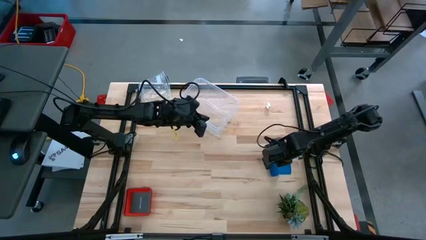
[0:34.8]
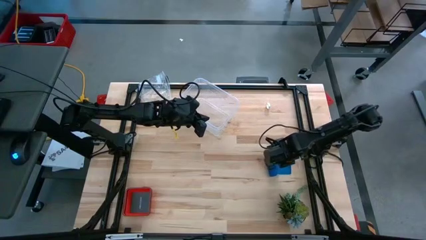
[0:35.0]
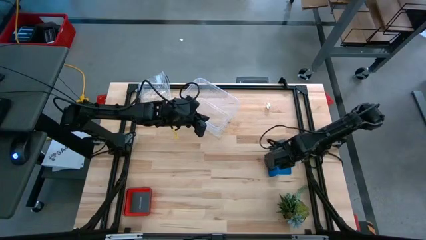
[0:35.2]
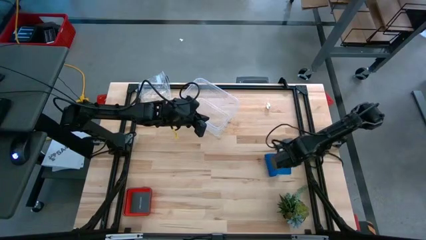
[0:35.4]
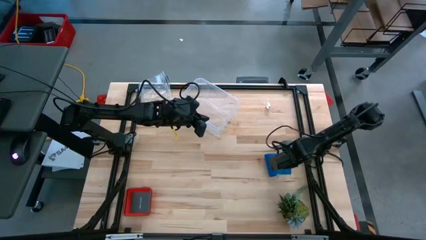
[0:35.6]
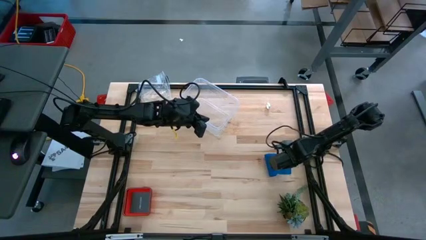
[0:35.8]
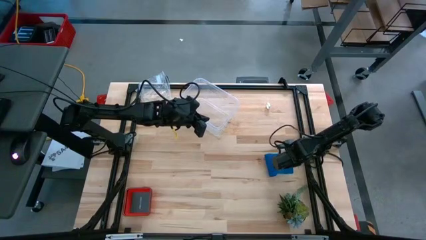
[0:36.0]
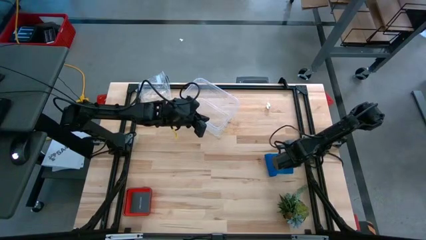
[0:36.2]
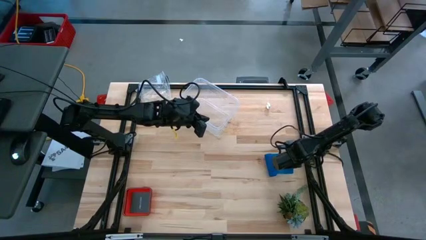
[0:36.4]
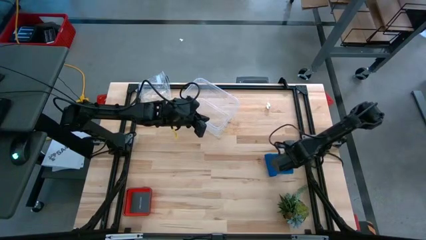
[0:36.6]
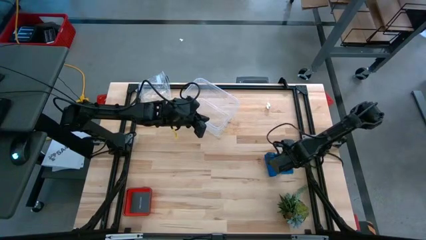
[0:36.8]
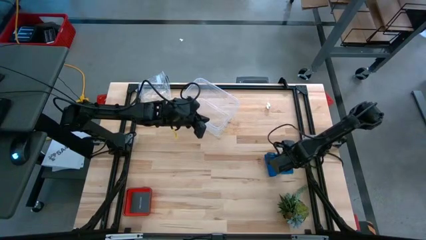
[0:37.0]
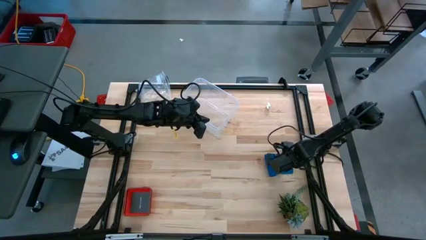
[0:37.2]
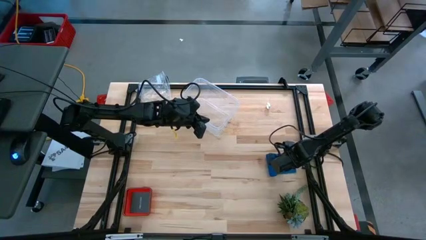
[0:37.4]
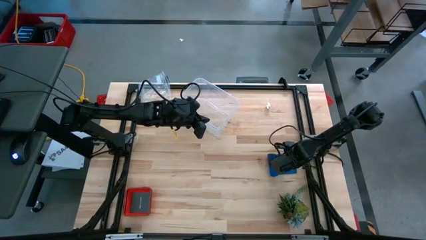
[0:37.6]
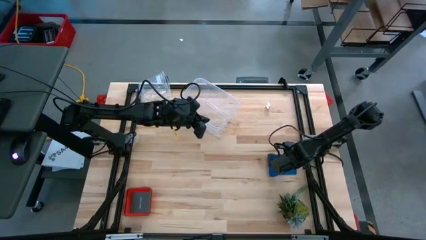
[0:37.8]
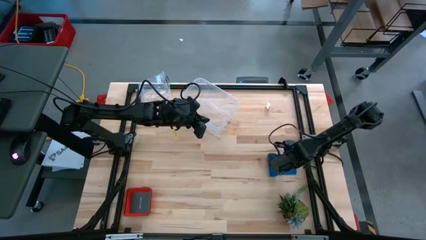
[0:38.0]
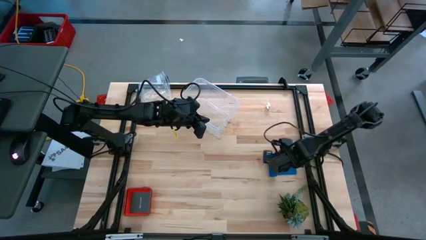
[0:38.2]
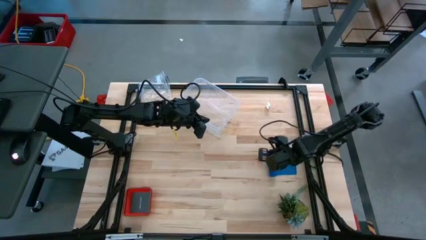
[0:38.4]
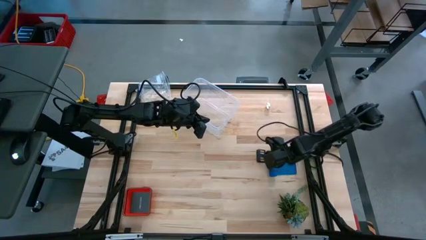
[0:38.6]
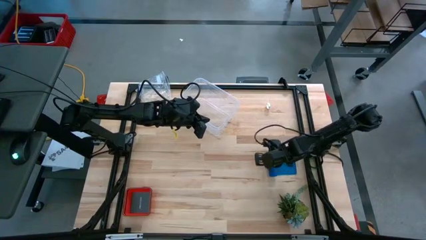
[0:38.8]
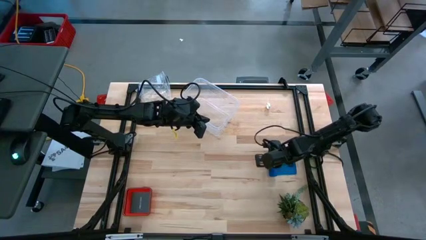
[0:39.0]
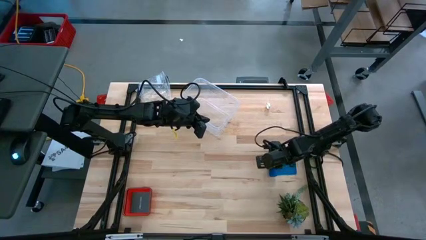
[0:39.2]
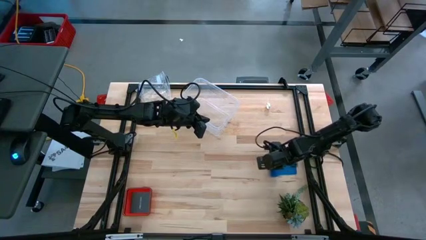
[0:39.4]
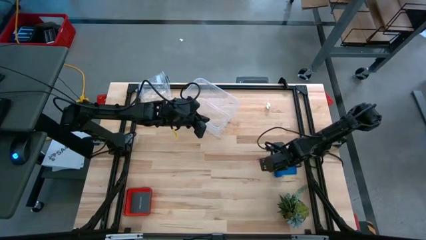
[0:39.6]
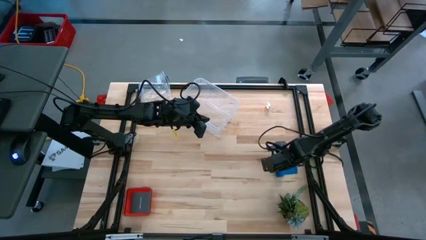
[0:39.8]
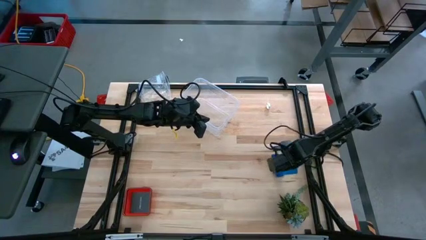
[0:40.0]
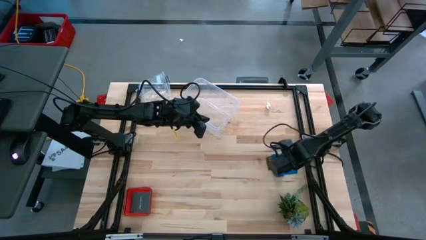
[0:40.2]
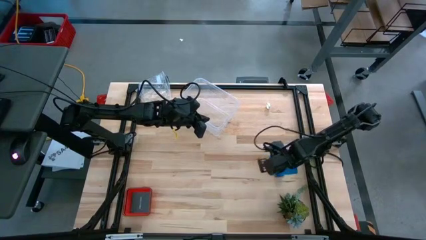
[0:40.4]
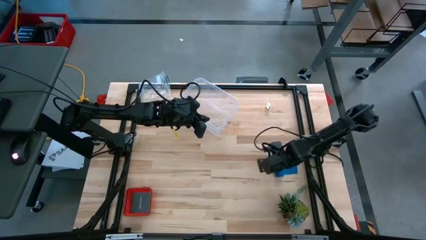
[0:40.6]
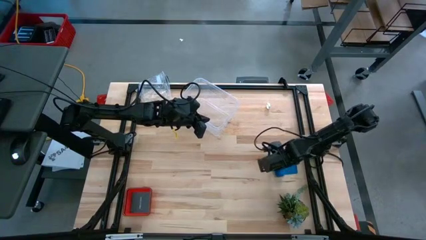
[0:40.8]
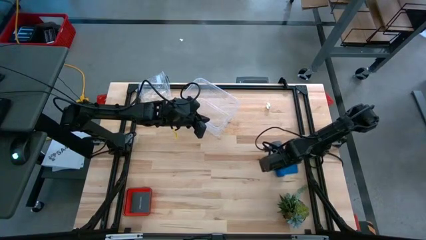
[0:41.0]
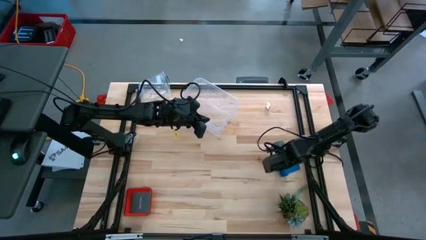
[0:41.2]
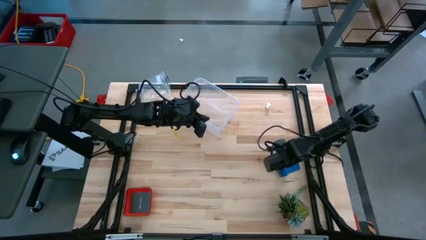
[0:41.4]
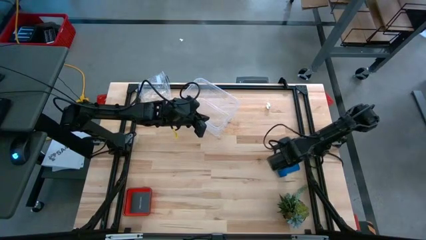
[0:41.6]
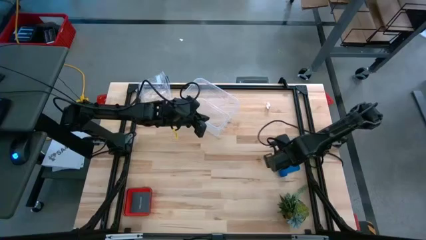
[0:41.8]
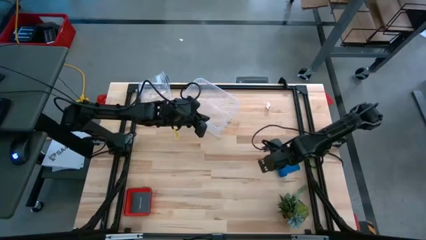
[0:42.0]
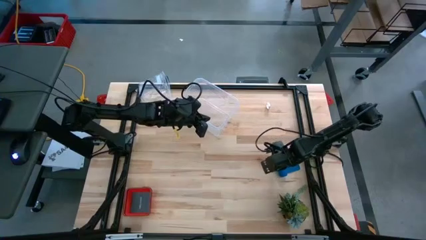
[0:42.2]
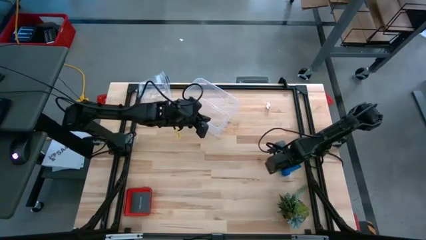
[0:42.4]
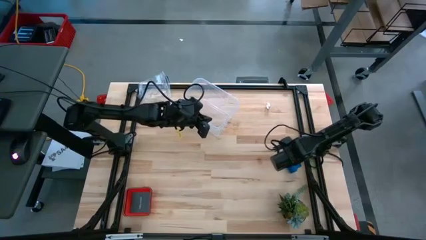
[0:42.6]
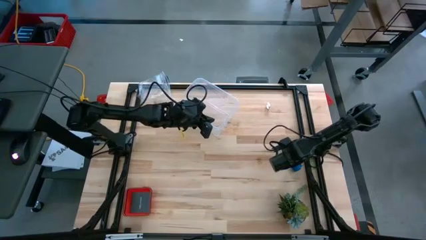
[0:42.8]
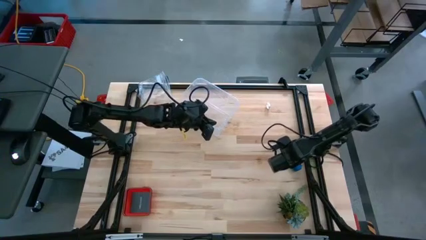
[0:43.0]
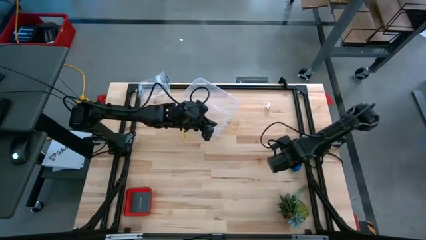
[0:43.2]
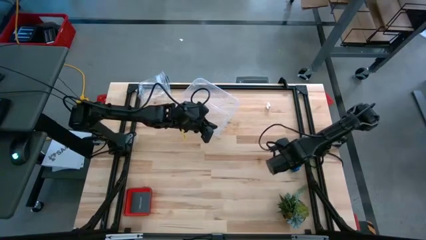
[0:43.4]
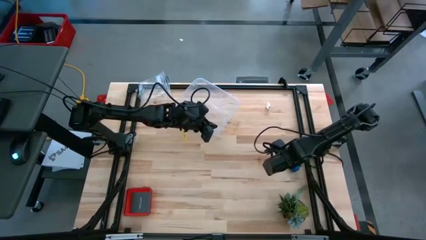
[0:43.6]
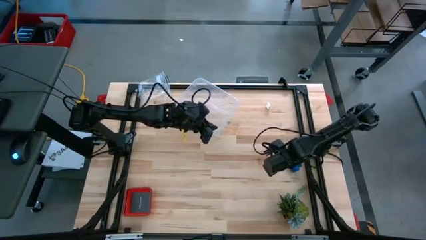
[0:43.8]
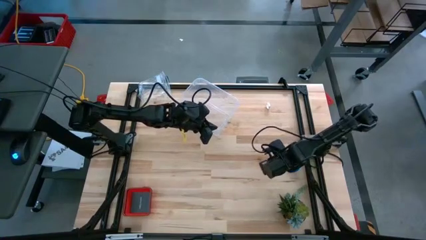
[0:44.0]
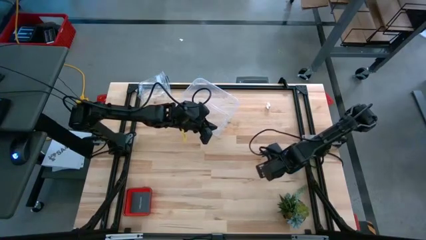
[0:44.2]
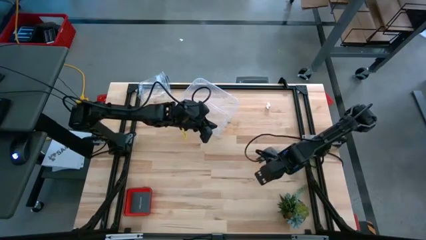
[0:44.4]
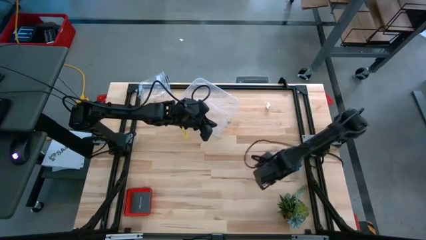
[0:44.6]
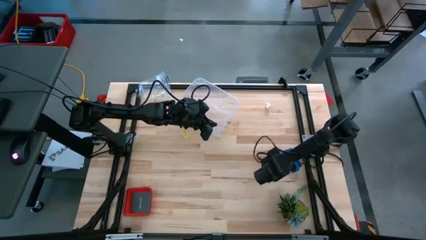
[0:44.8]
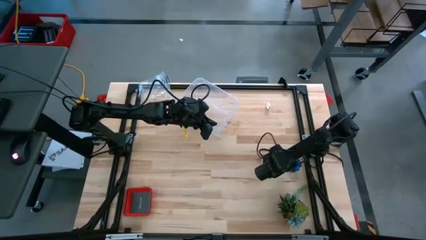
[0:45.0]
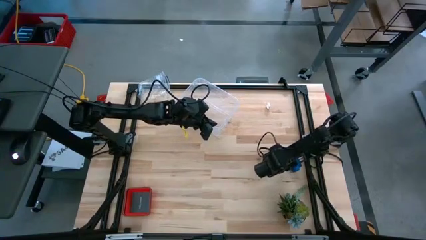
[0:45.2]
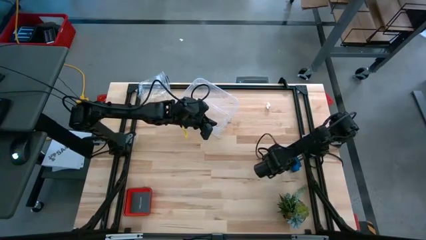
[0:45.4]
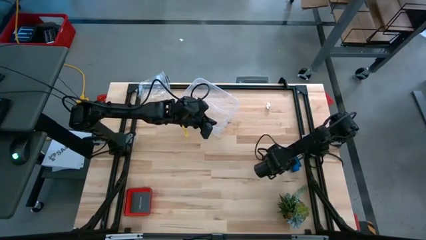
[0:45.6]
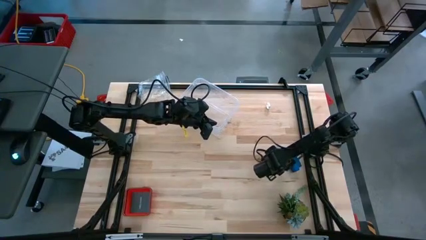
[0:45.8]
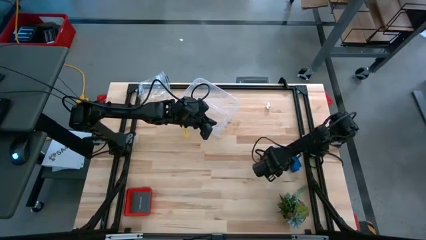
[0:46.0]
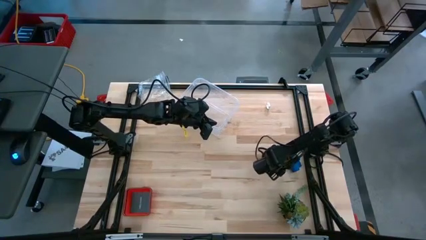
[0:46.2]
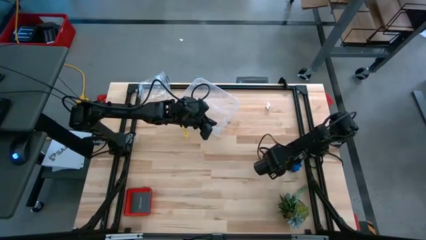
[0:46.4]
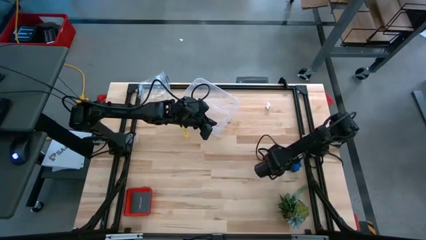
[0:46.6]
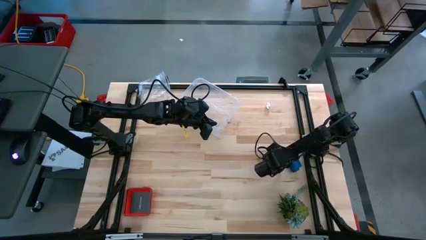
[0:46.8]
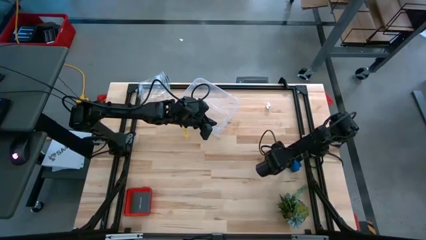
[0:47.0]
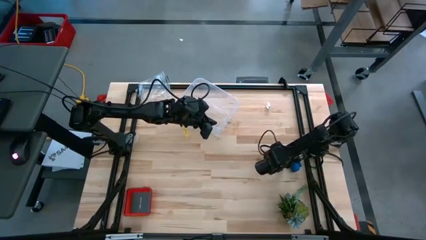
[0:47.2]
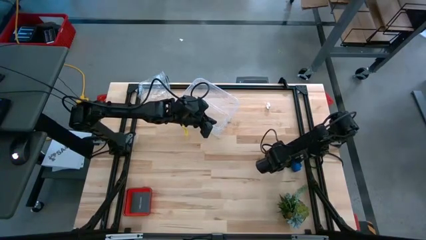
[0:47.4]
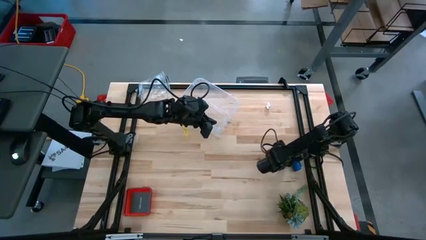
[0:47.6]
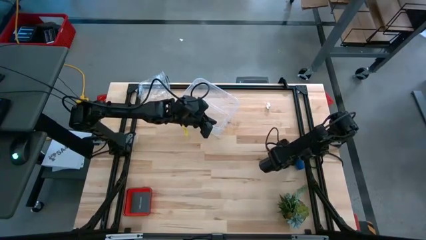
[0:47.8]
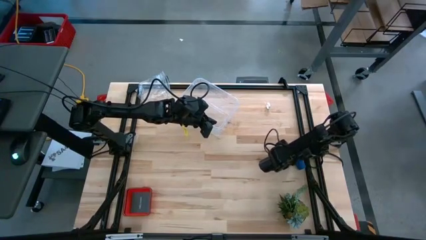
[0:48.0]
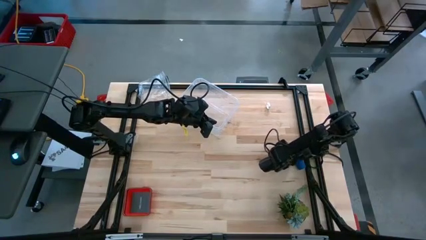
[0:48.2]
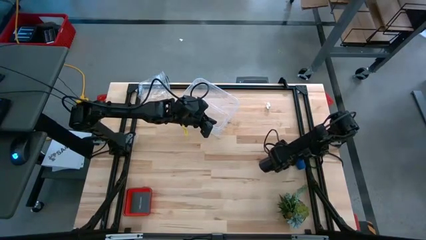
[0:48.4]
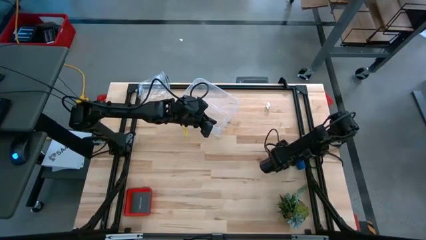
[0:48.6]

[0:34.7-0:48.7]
Task: Roll bandage
Roll the blue bandage

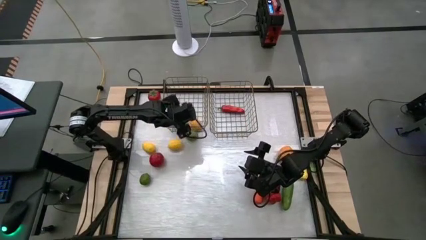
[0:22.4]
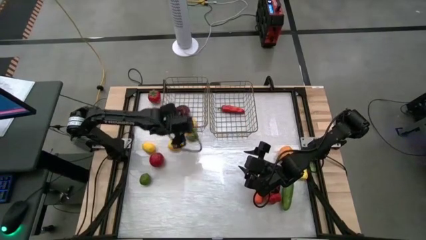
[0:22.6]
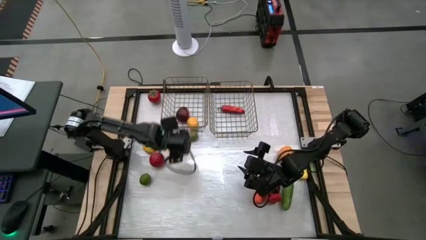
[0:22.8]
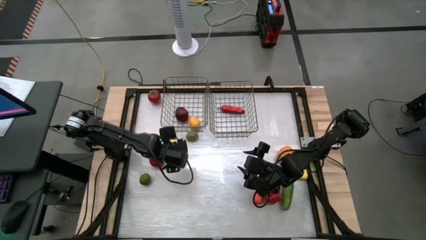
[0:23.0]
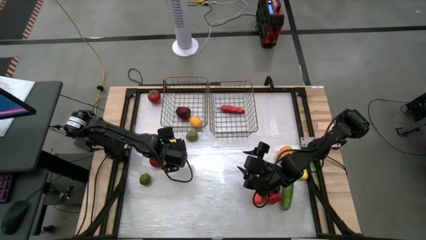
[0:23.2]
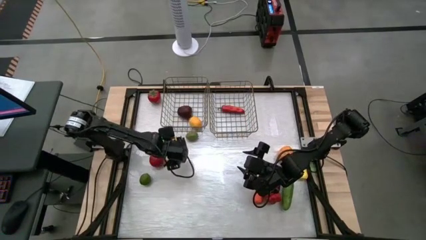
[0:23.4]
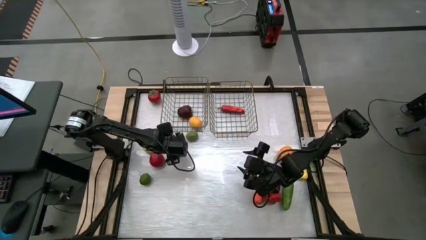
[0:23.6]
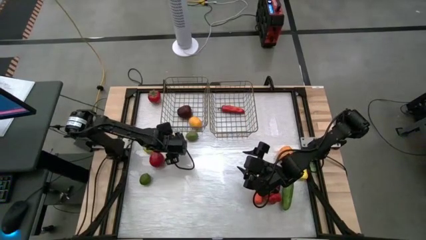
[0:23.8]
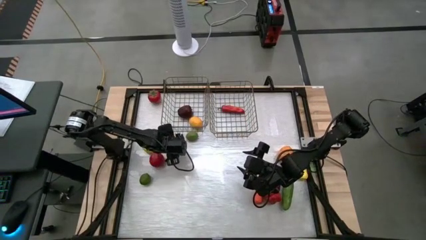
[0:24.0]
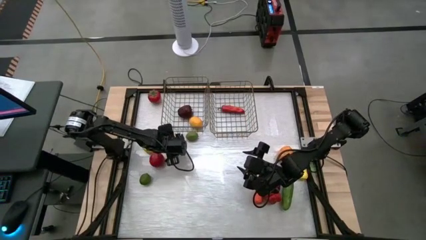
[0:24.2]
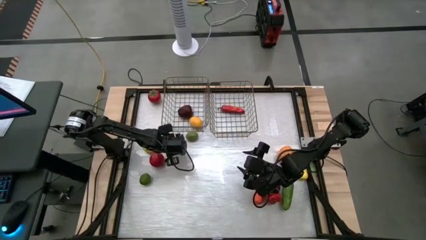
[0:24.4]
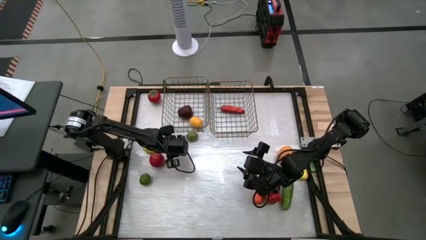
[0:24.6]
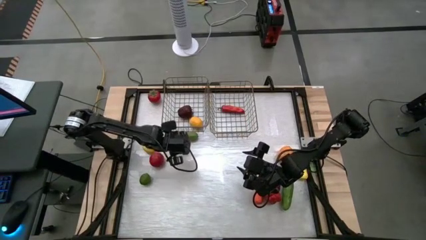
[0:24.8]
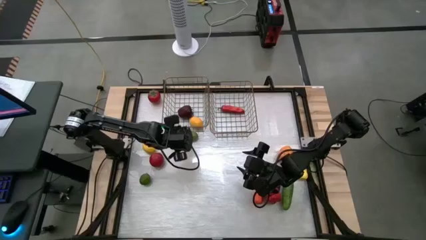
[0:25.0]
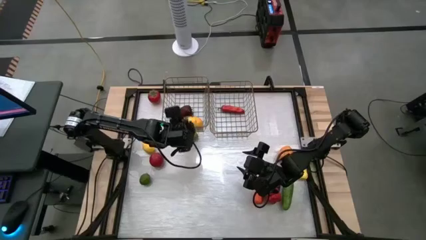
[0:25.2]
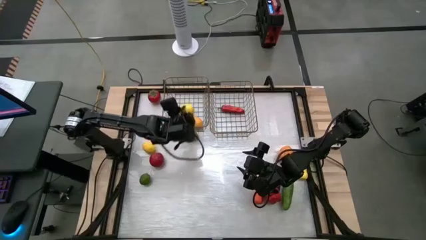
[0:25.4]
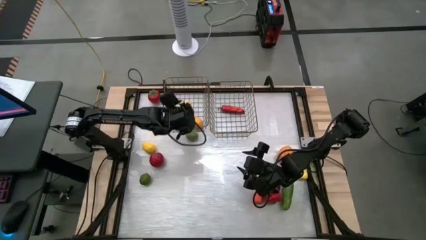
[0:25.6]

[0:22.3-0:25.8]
Task: Sort produce into baskets
Put the right lemon into the left wire basket
